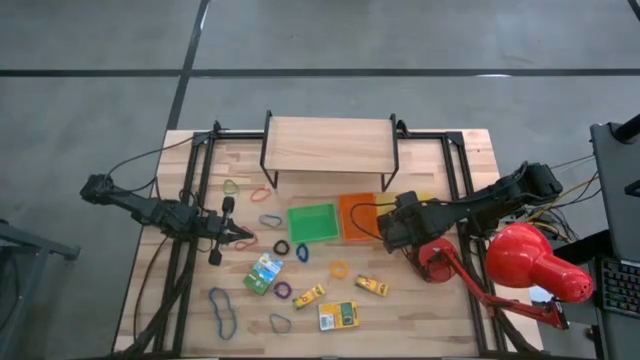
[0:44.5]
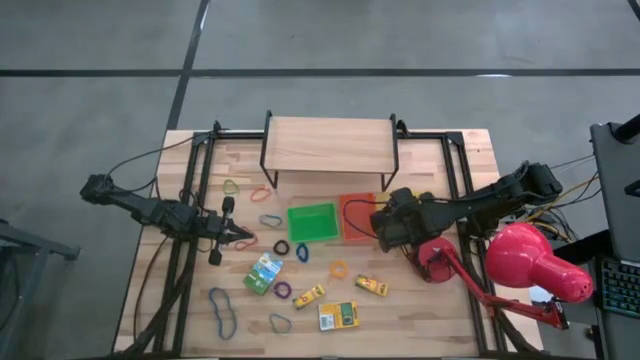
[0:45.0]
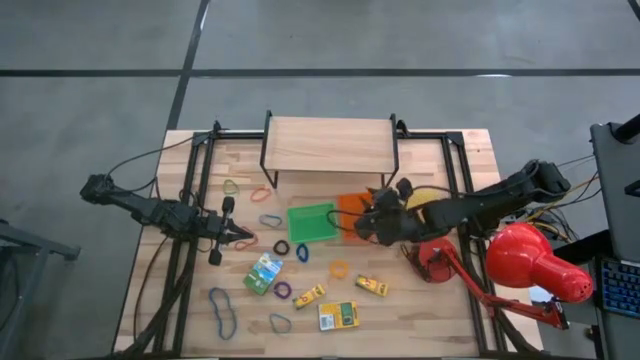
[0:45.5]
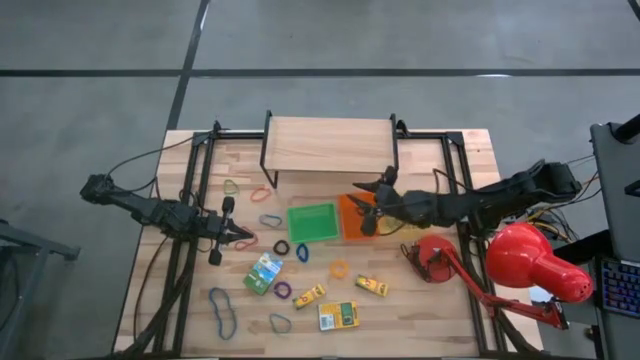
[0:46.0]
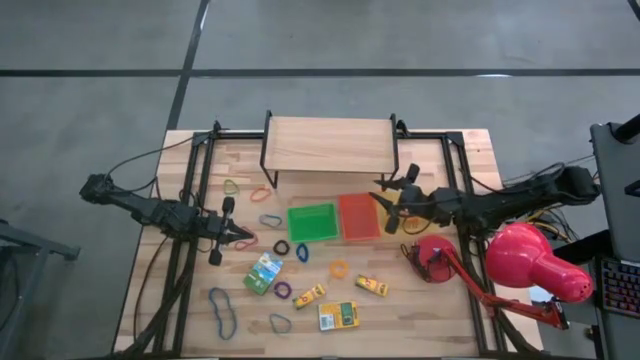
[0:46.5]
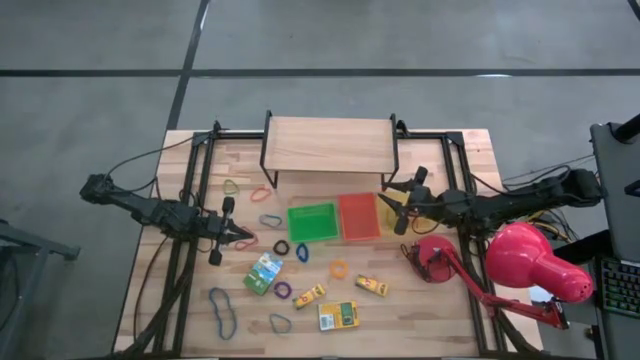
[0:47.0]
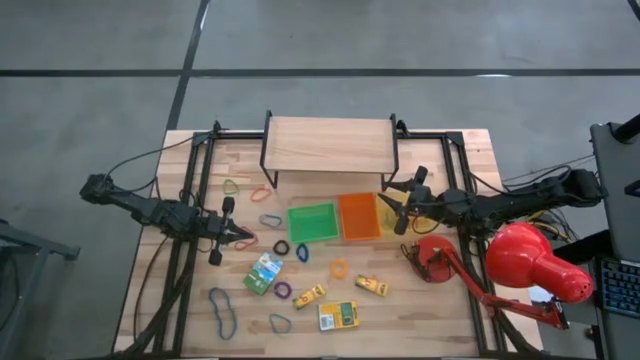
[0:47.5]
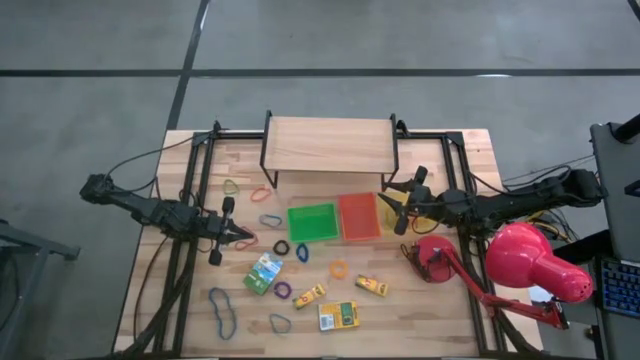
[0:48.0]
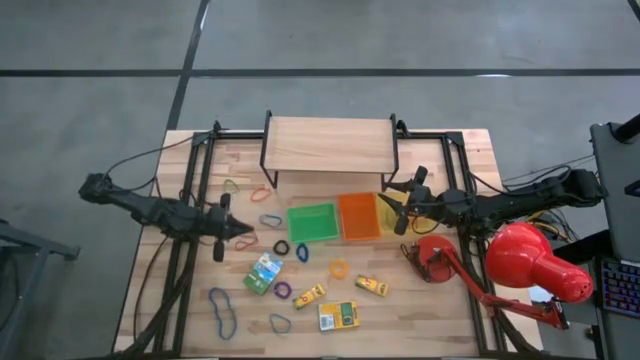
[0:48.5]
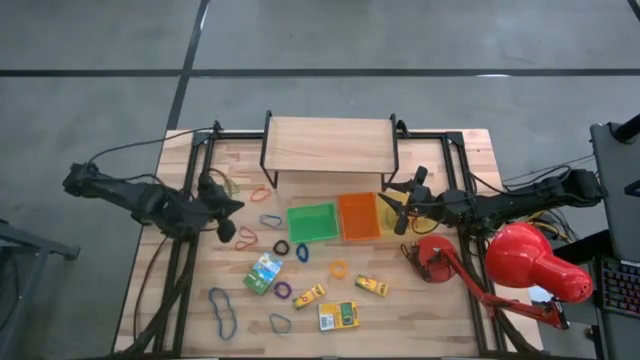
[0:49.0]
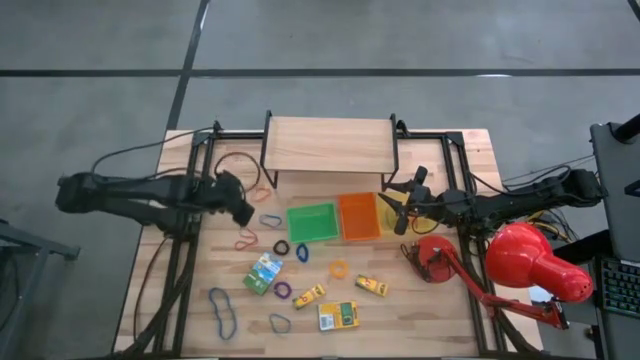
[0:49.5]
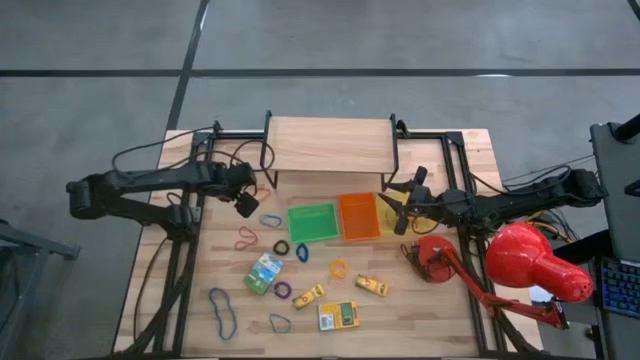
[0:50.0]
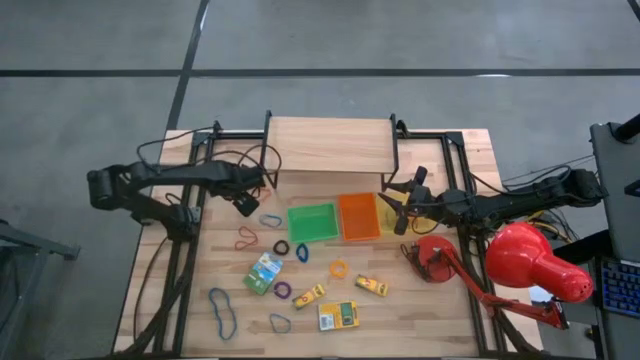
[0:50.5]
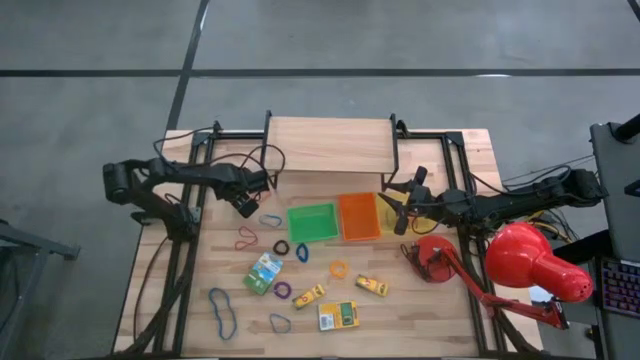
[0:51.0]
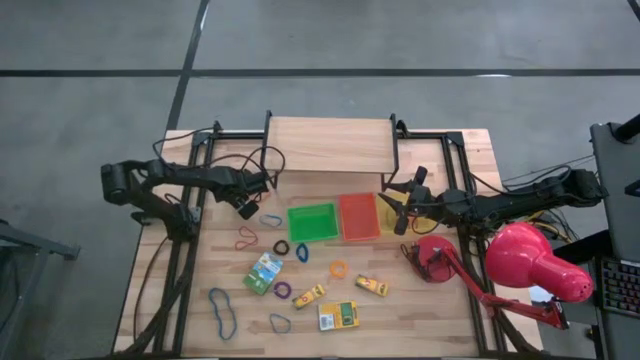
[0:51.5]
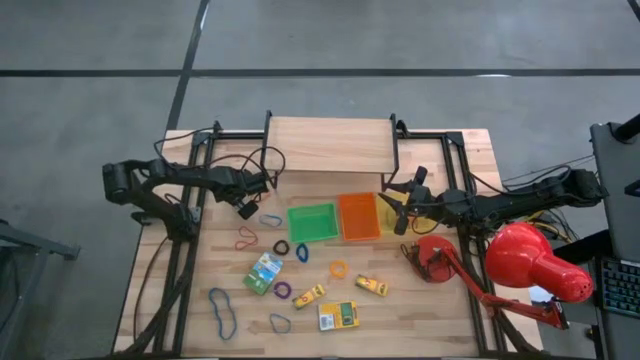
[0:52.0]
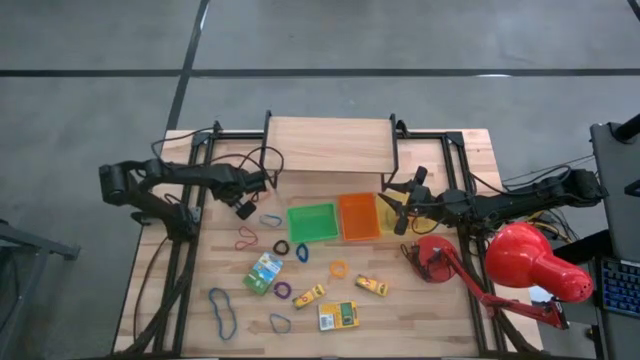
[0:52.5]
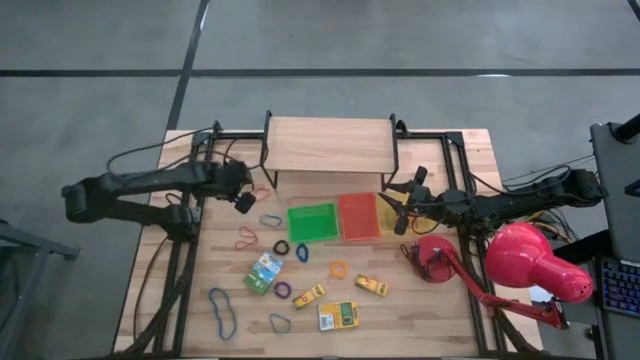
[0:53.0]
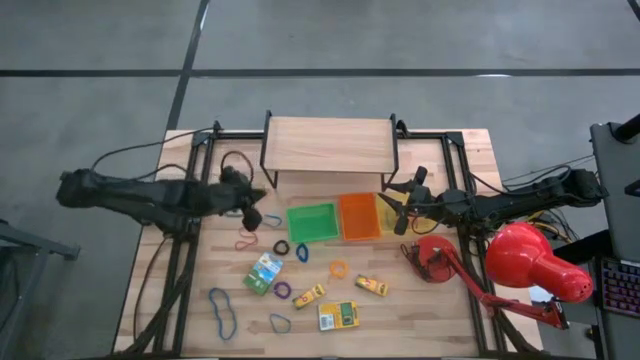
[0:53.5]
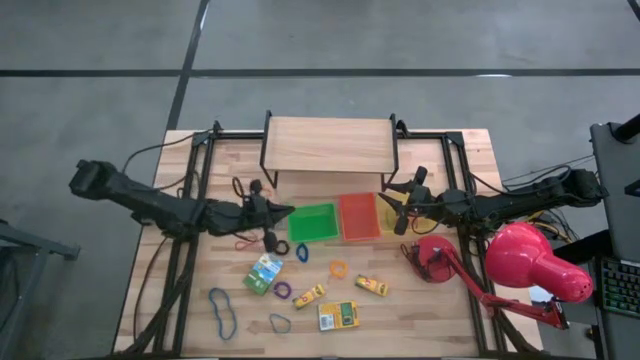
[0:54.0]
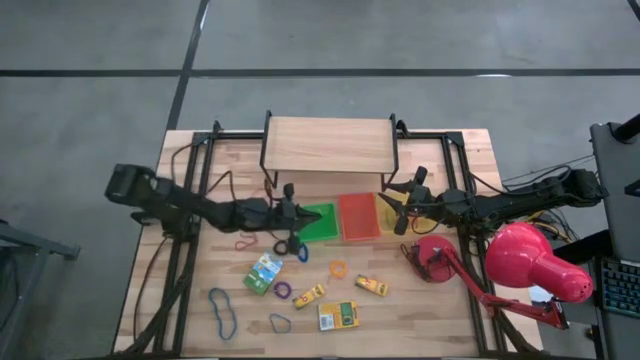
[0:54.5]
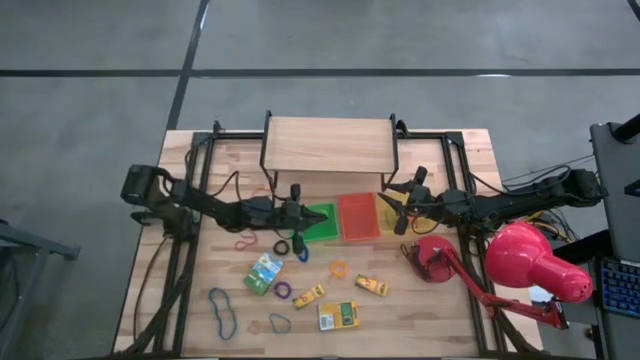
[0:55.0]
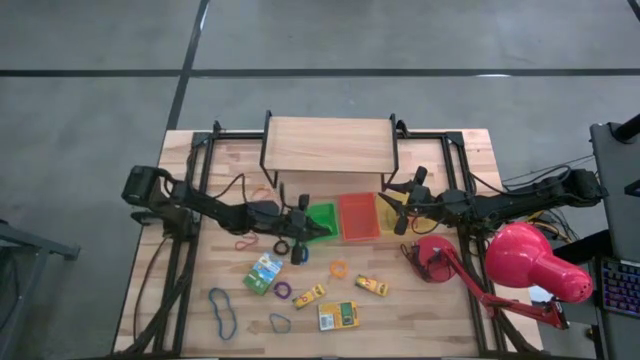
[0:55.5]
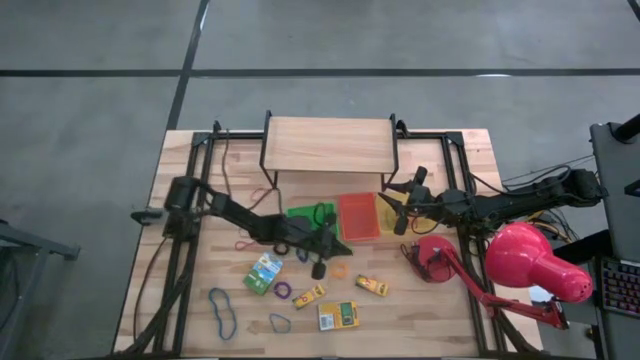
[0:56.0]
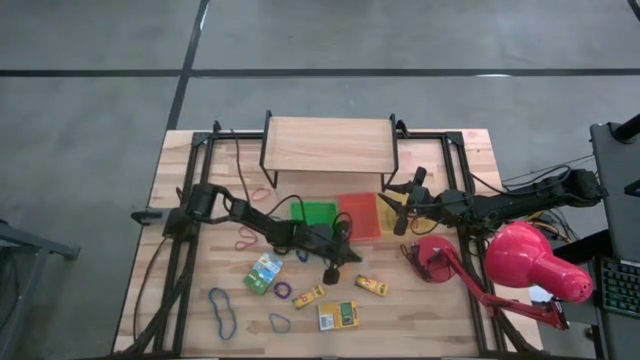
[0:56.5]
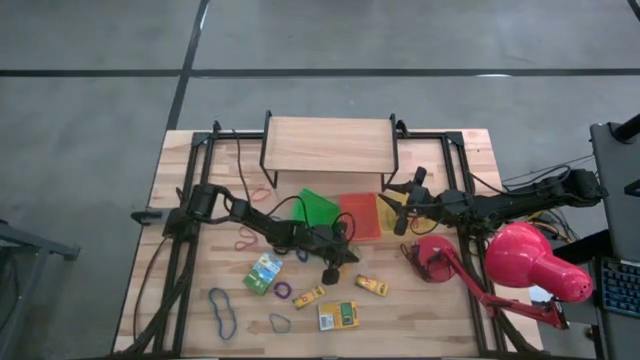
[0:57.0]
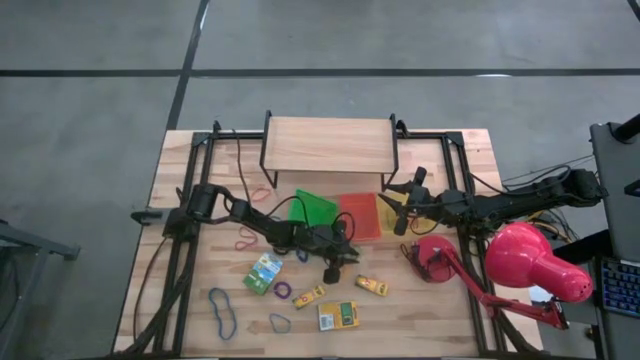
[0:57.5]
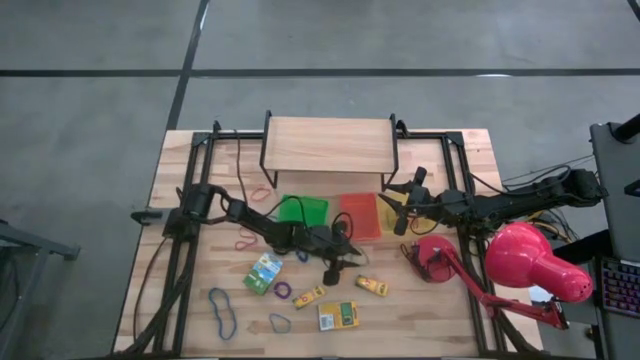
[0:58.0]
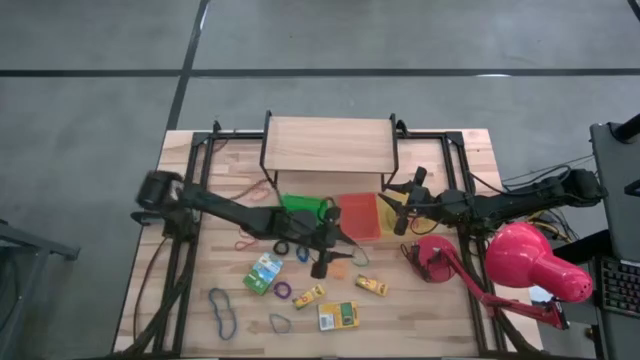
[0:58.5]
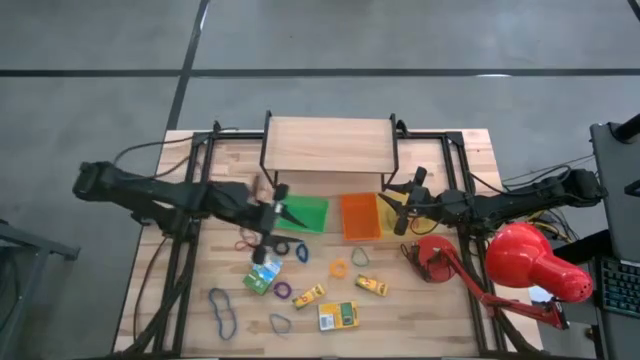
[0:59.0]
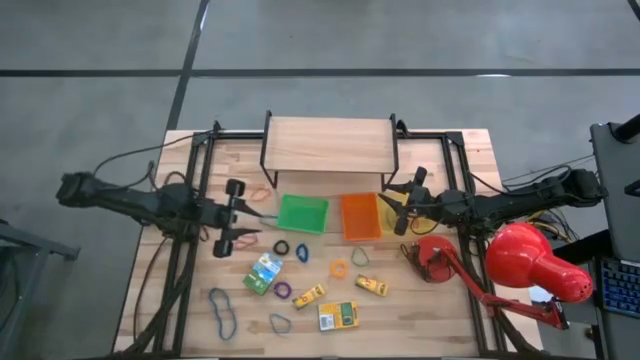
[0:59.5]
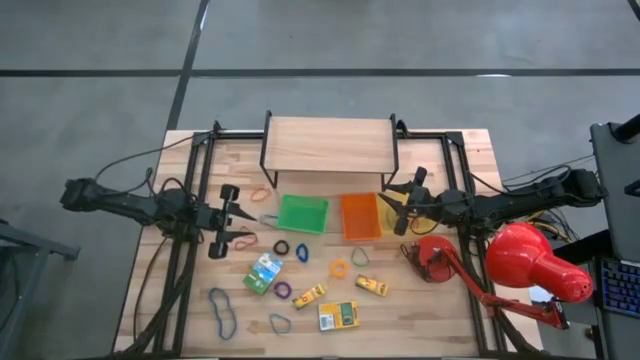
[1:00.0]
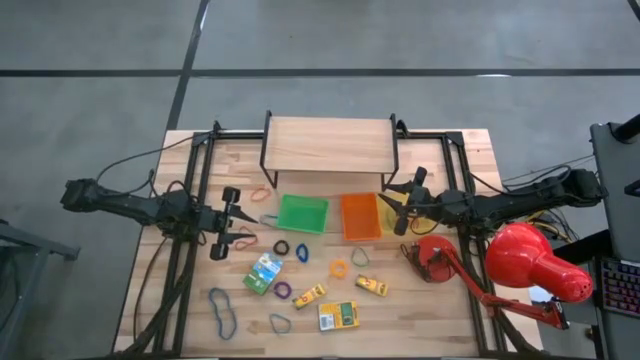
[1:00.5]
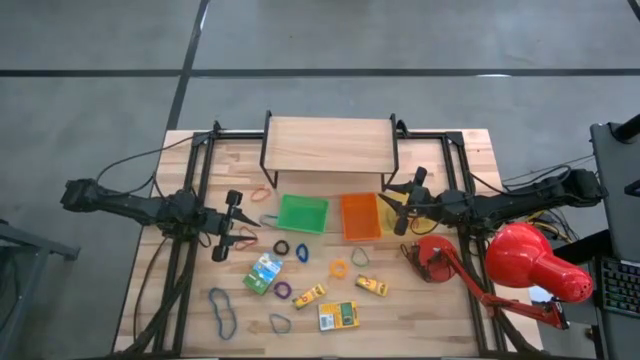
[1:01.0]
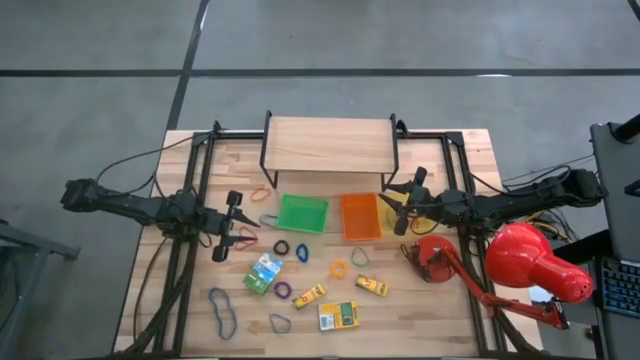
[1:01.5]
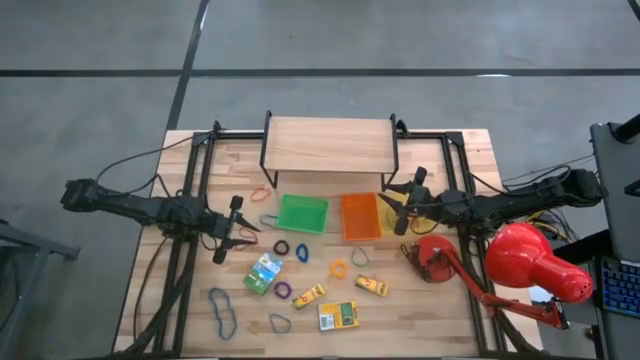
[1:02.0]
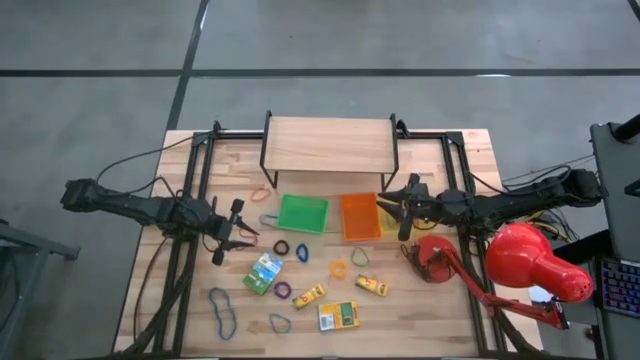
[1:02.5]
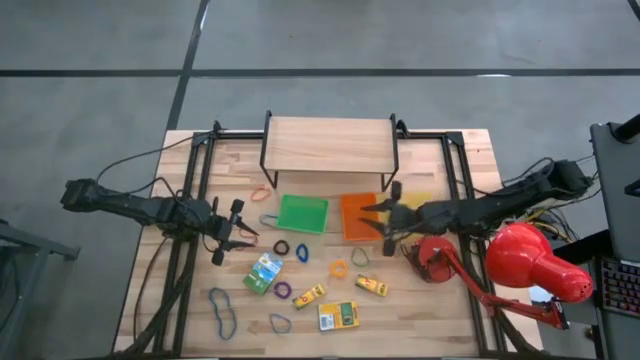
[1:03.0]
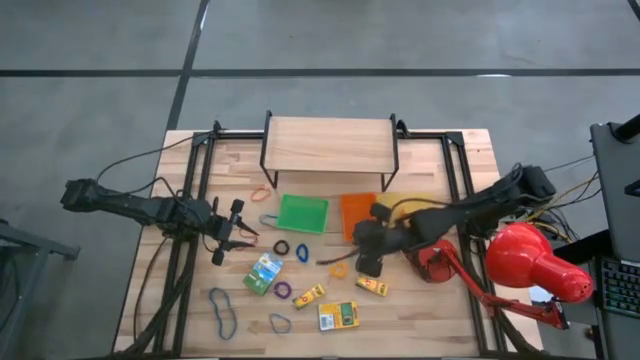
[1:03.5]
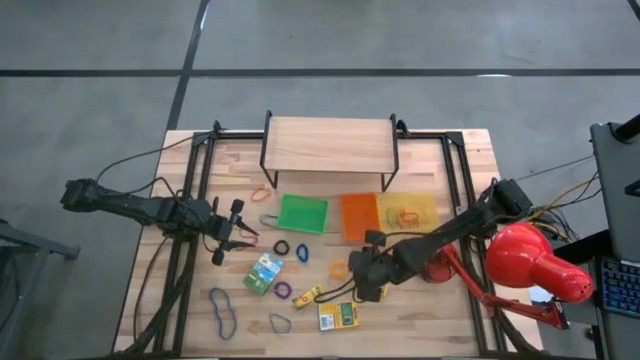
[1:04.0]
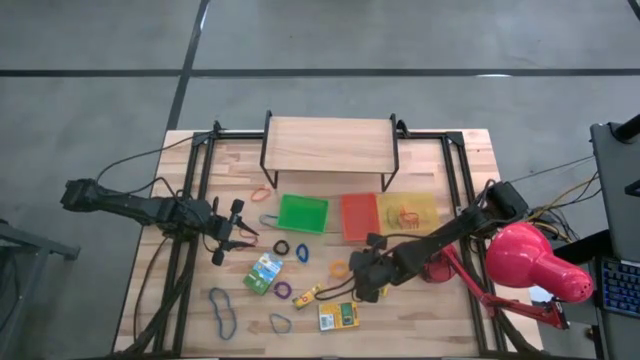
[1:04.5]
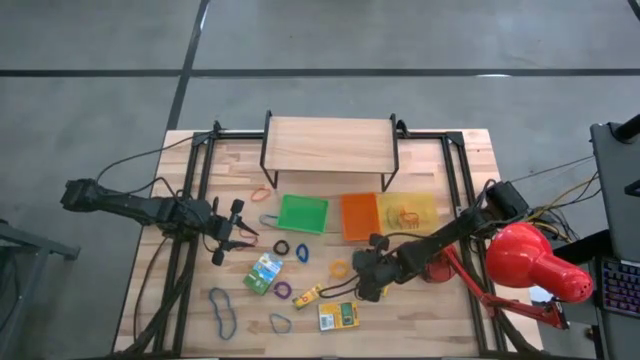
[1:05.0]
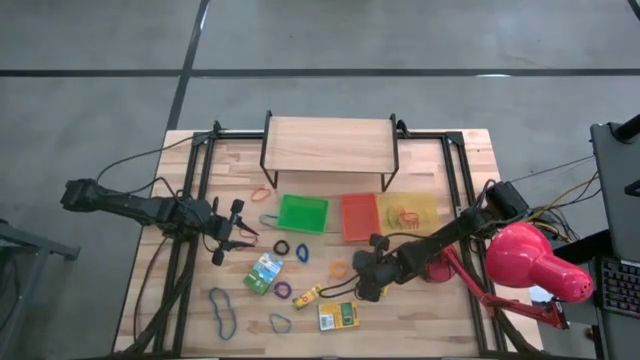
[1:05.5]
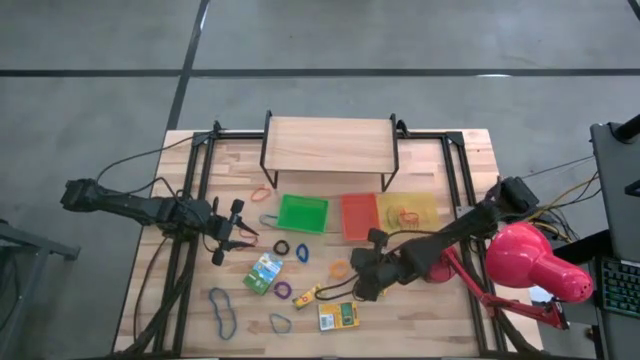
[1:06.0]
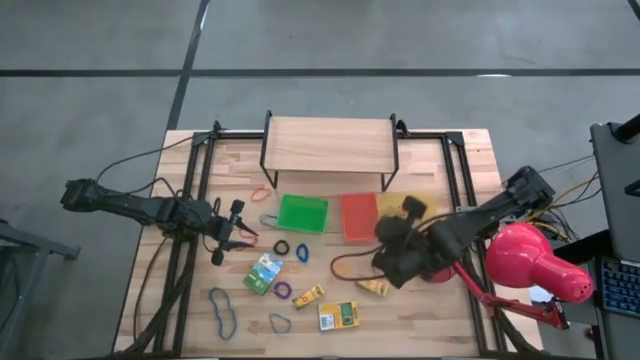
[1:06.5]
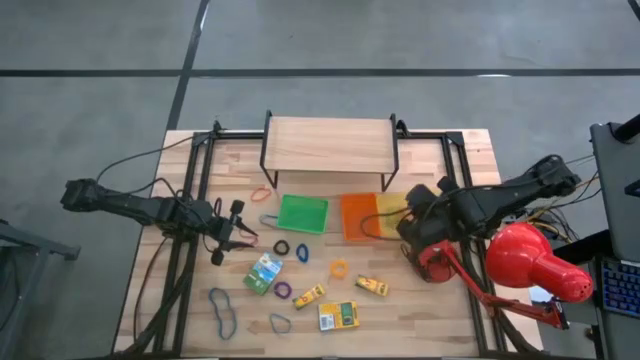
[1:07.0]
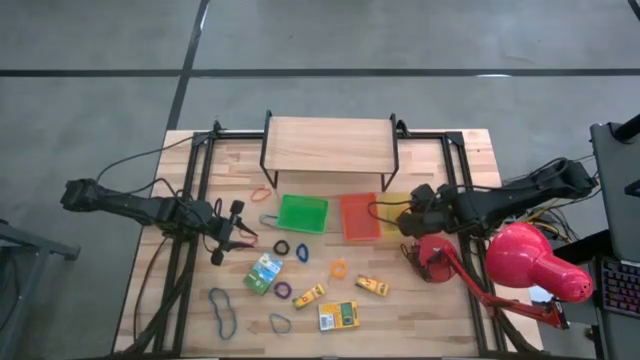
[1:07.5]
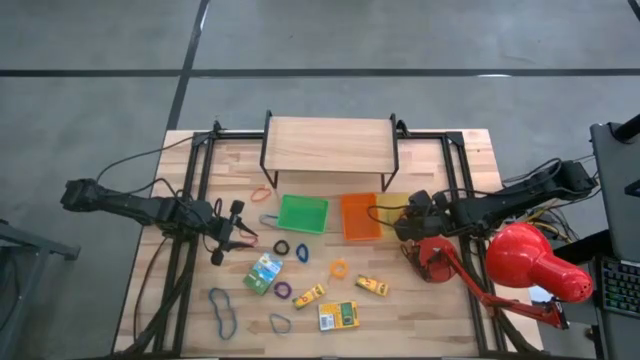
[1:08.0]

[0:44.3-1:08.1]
Task: Pick & Place Office Desk Supplies
Put the green rubber band into the yellow bin
